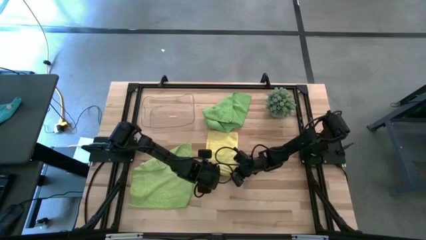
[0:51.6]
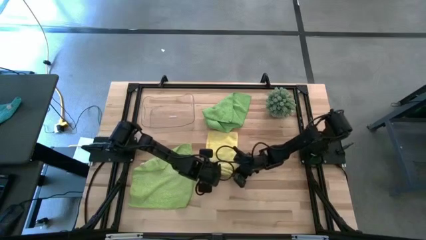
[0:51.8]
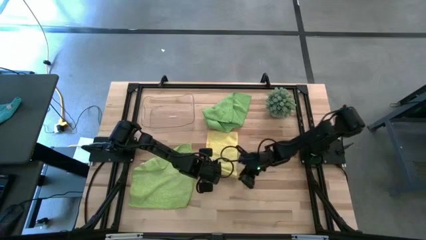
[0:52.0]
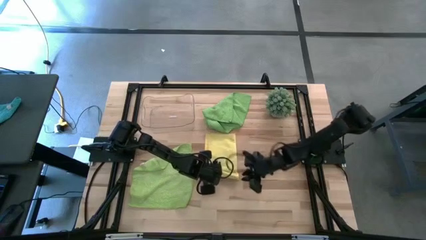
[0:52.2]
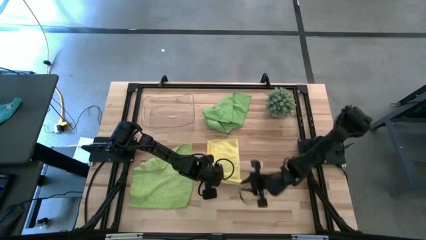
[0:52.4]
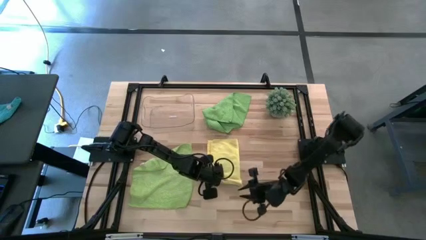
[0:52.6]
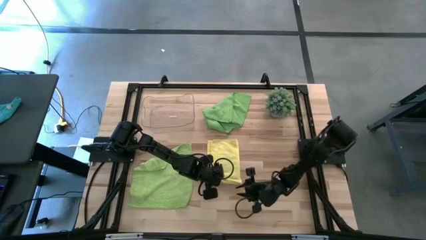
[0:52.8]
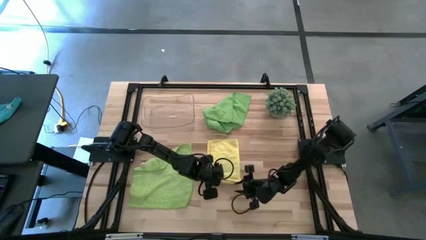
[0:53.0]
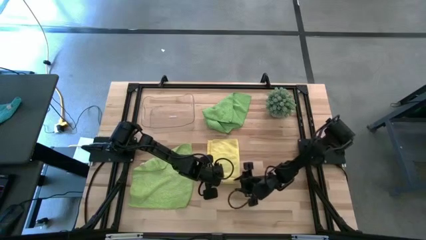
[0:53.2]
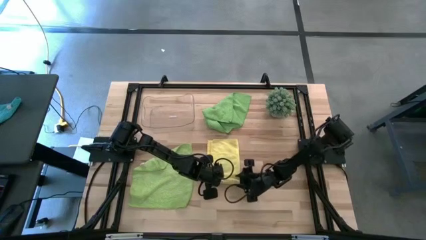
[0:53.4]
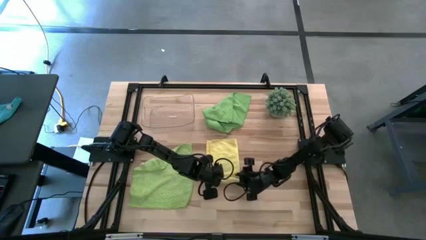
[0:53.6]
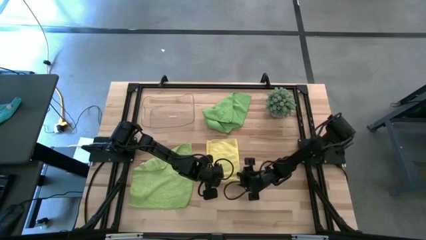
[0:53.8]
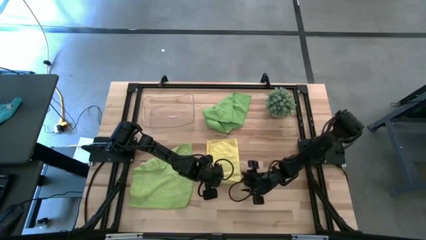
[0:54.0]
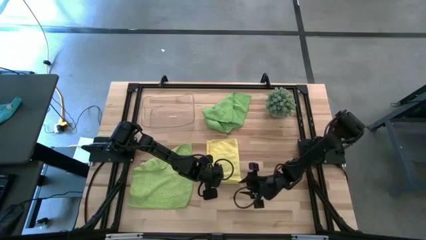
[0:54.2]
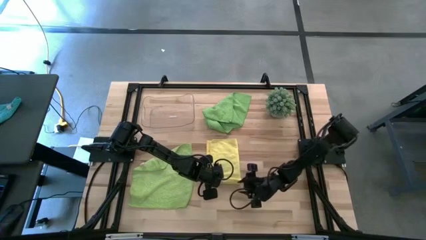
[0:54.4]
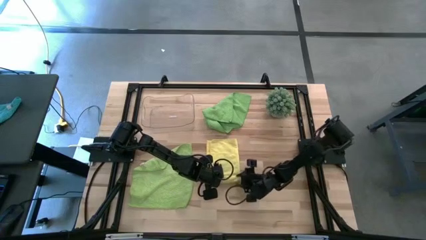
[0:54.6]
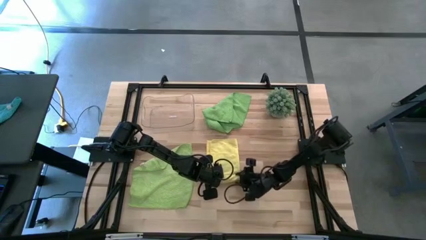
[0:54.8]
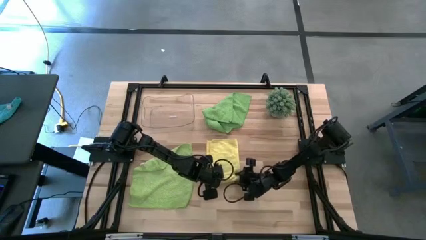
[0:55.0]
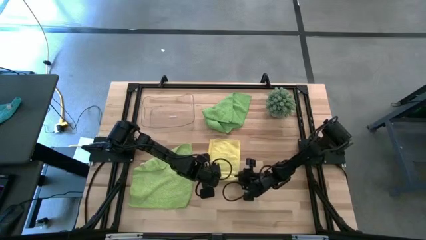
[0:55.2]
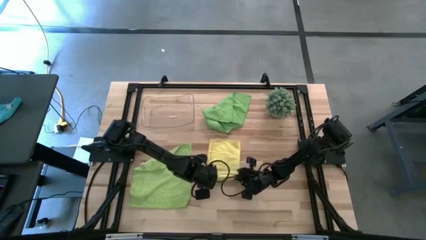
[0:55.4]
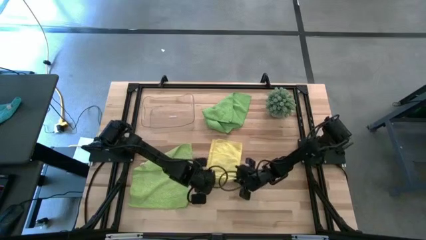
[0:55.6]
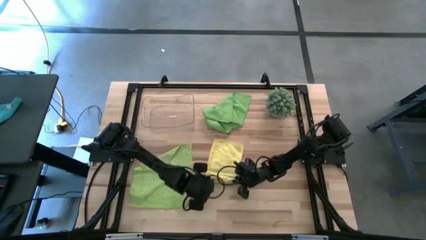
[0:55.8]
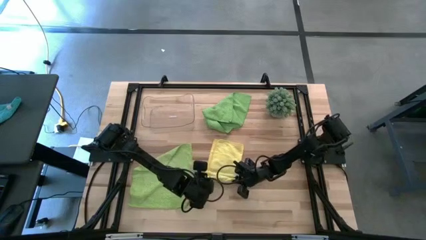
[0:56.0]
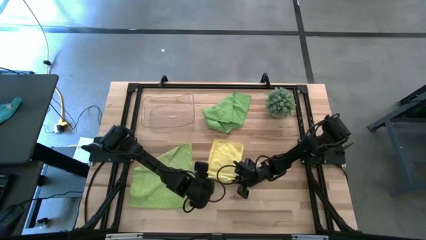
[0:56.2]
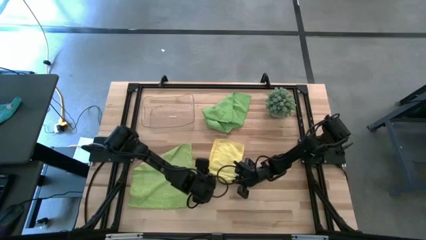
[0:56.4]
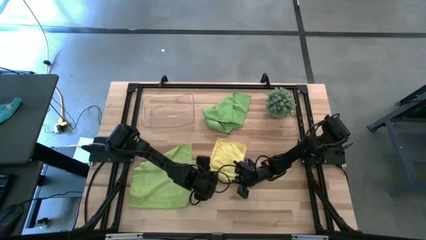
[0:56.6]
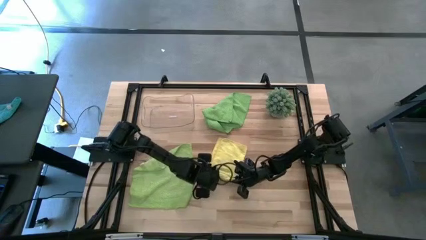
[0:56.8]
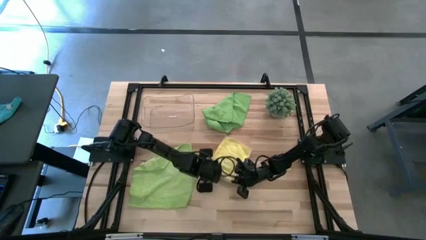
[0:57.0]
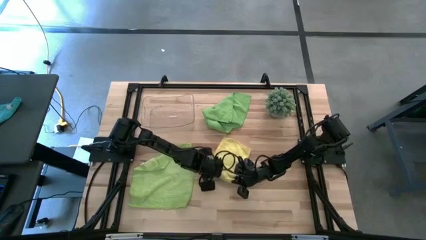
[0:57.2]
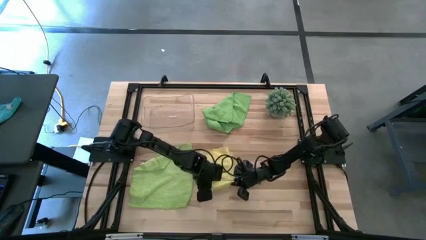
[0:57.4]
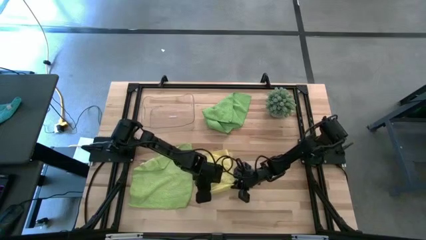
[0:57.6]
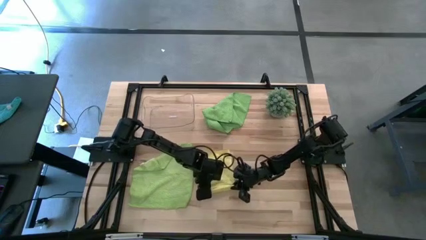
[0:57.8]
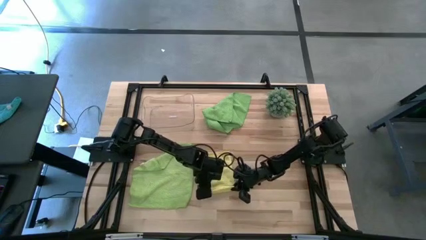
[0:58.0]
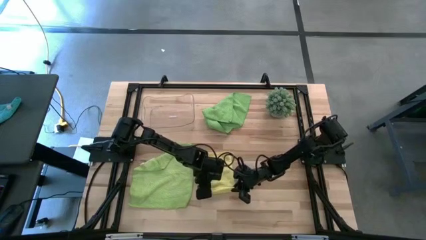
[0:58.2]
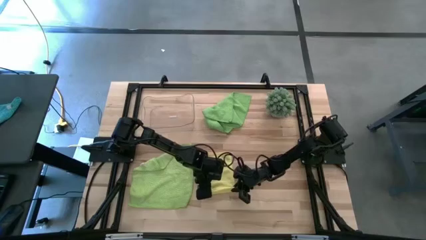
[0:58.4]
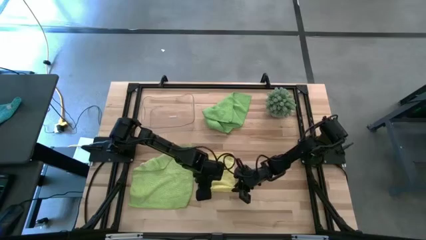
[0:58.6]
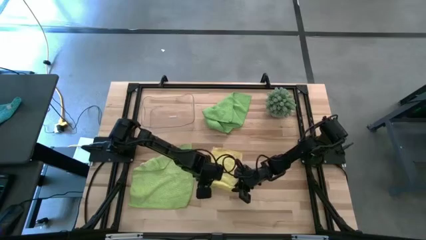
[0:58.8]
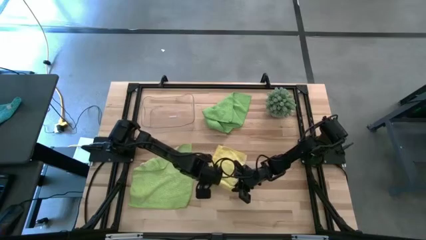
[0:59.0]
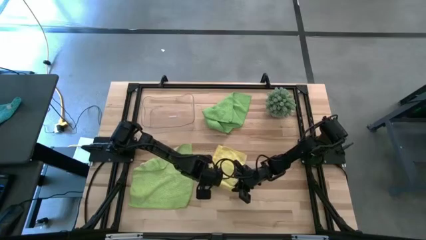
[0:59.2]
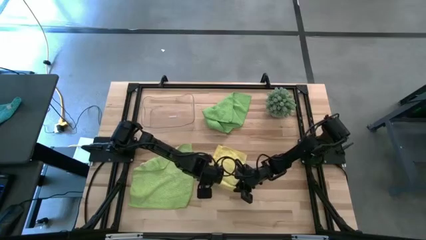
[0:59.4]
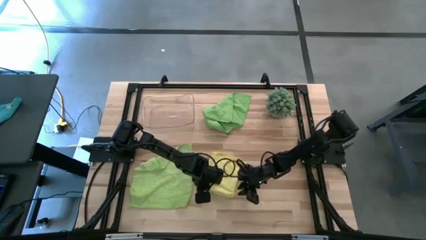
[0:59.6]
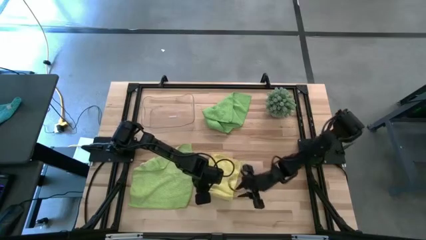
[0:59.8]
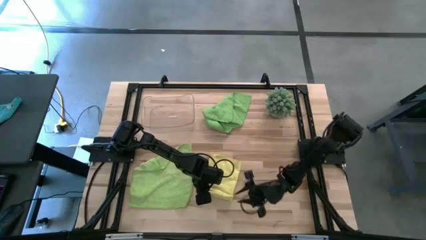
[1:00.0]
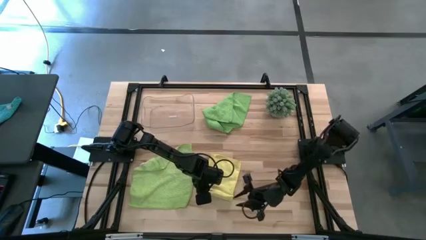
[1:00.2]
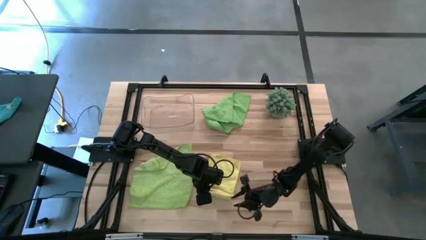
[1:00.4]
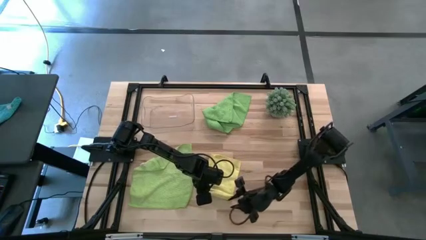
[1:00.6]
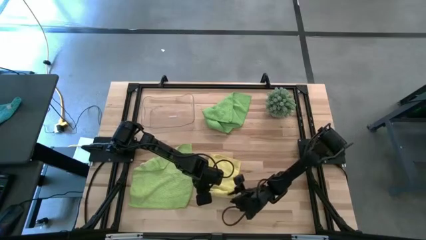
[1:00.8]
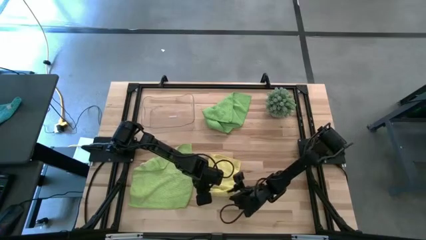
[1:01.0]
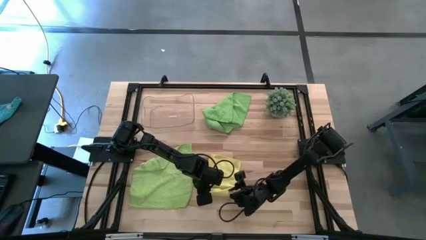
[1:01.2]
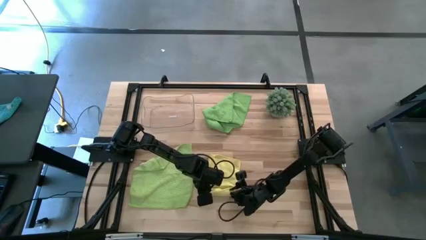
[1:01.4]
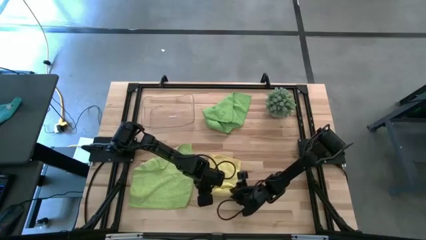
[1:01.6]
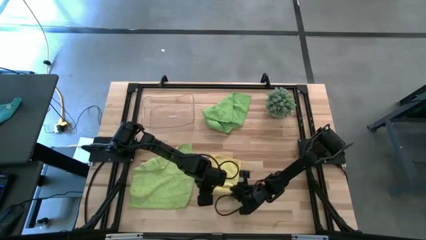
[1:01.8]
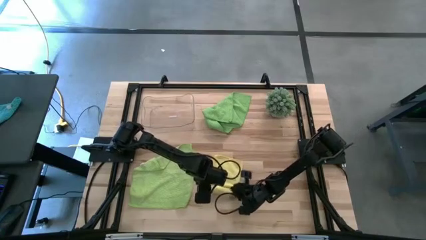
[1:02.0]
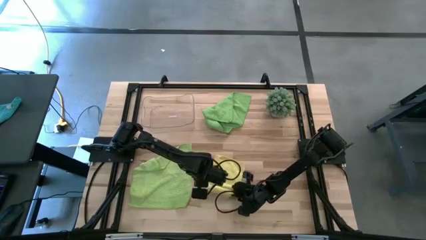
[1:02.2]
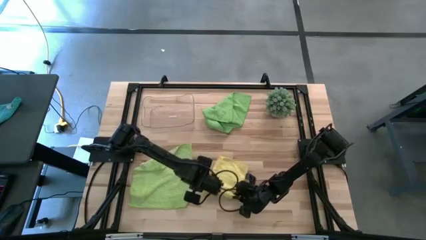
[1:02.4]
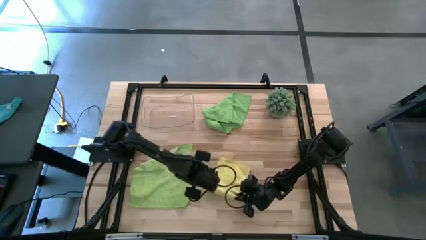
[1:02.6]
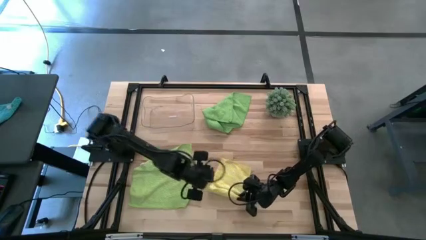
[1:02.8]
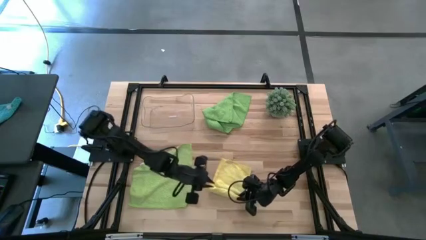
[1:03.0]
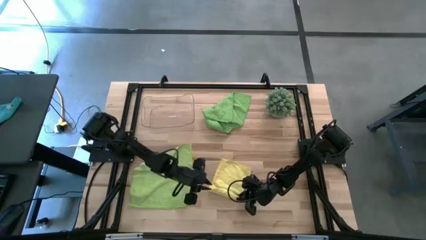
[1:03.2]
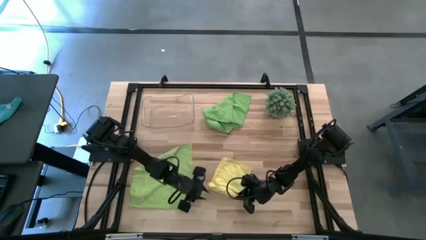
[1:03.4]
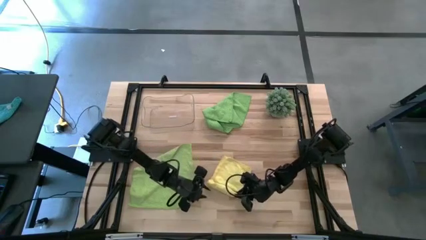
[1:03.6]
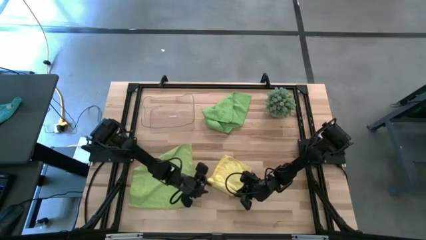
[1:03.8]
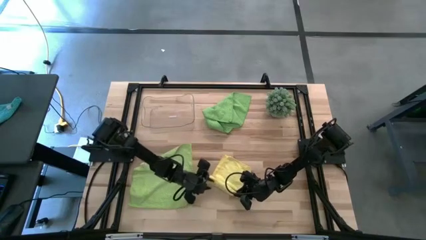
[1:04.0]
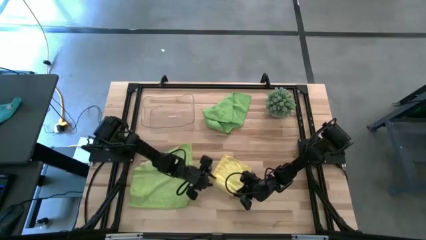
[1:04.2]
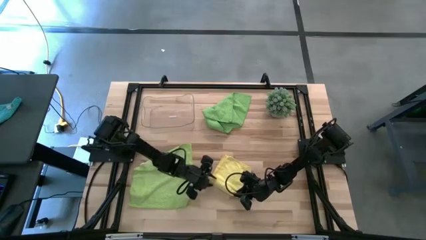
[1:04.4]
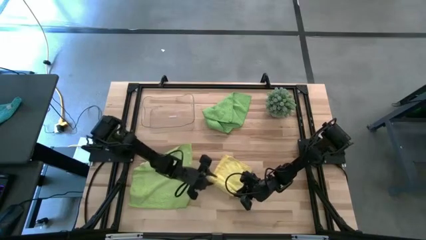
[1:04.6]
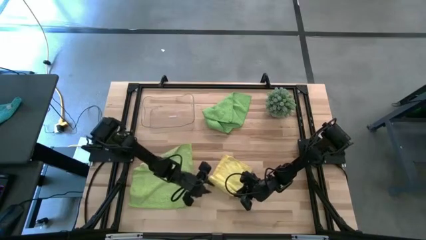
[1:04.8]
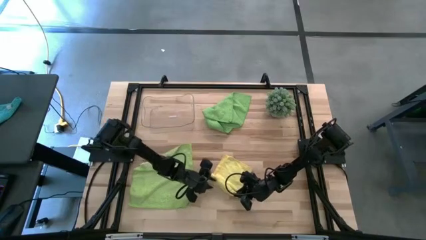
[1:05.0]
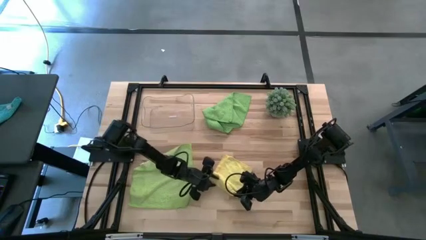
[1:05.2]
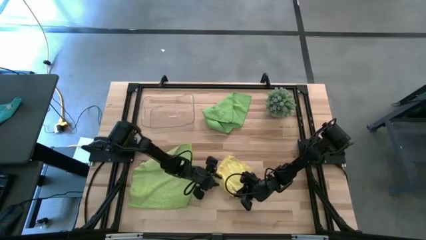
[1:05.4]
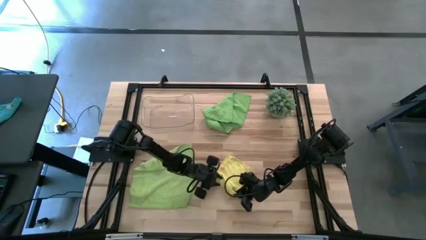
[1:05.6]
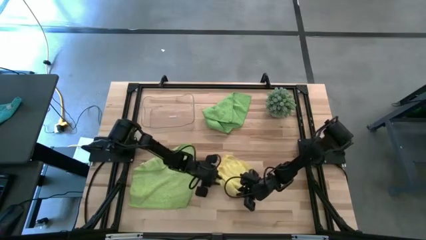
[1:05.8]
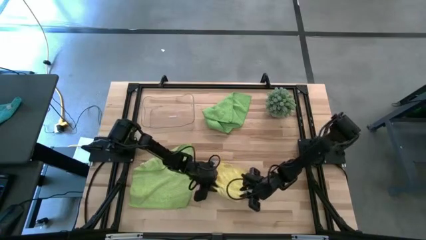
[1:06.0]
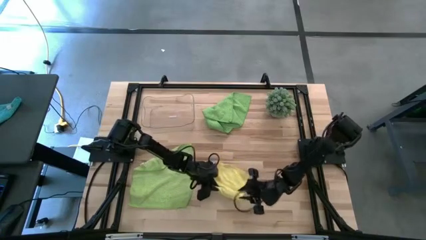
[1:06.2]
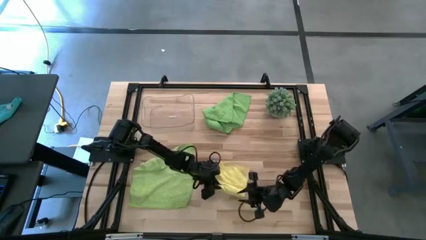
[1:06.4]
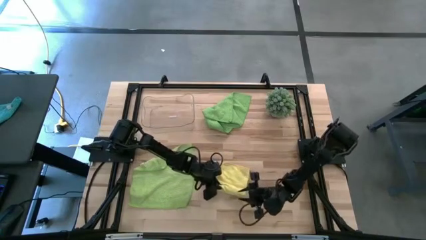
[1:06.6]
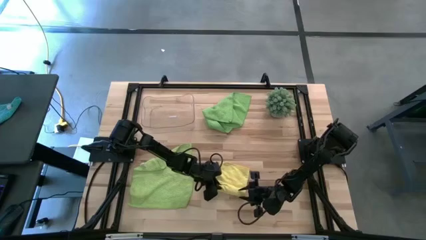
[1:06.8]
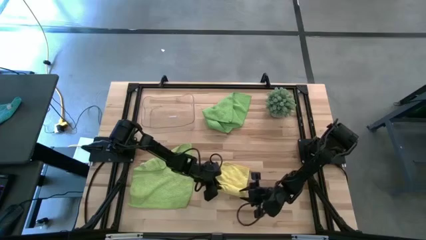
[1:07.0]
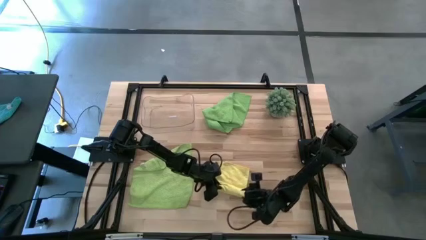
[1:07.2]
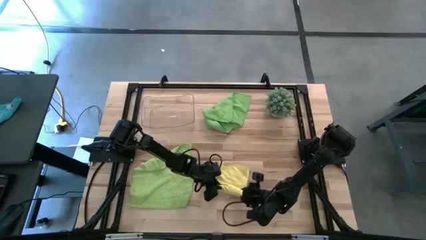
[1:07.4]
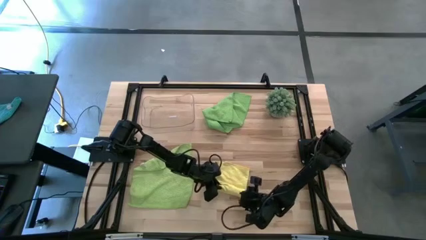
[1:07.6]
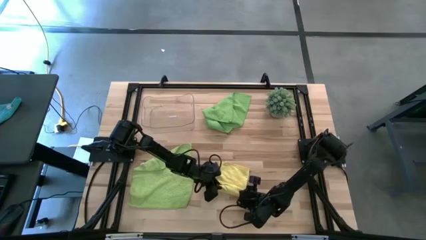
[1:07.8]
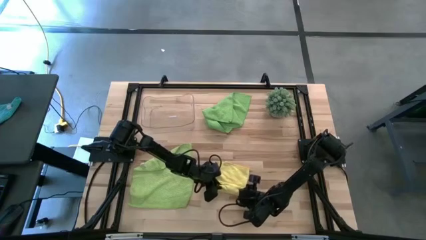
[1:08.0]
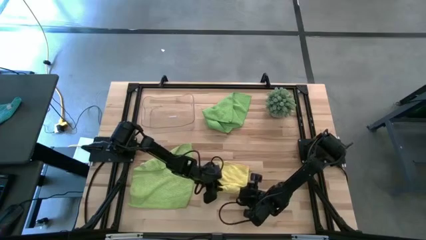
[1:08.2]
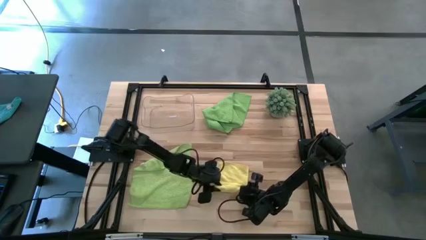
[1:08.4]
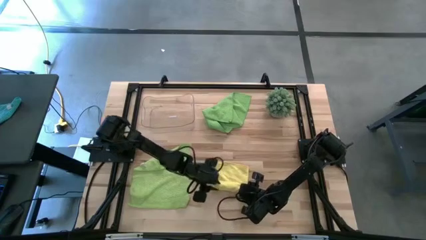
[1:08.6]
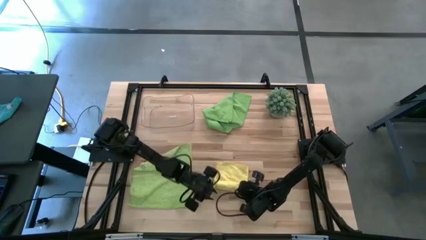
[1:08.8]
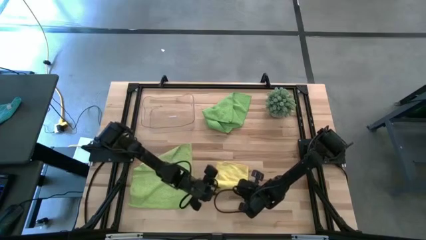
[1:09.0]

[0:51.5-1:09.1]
Task: Roll microfiber towels into tight, uniform cylinder then place into a basket
Roll the yellow towel
